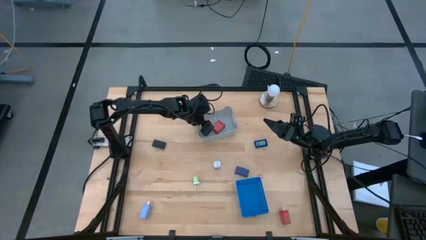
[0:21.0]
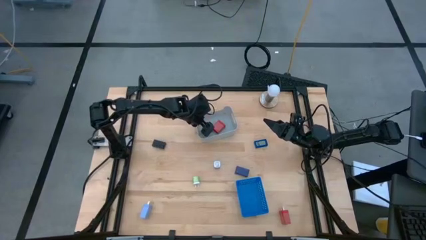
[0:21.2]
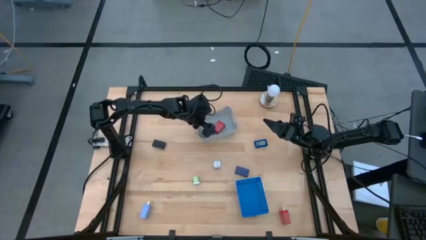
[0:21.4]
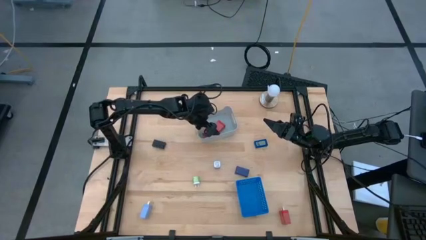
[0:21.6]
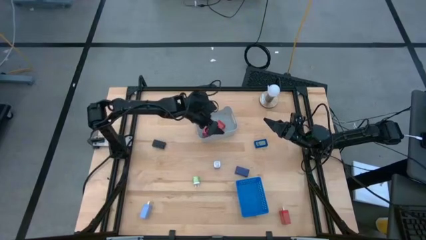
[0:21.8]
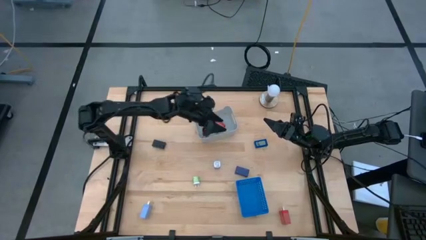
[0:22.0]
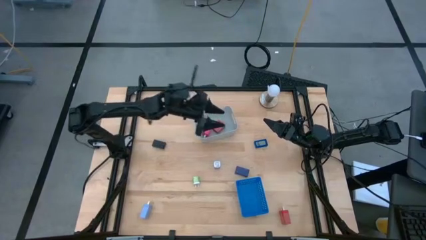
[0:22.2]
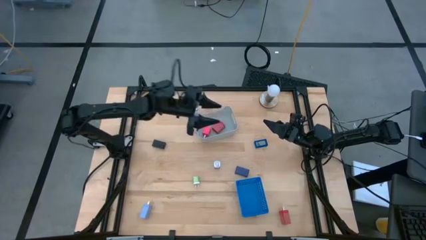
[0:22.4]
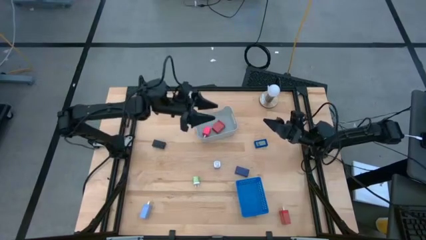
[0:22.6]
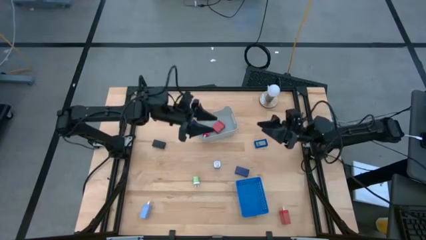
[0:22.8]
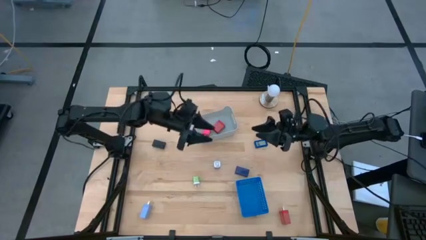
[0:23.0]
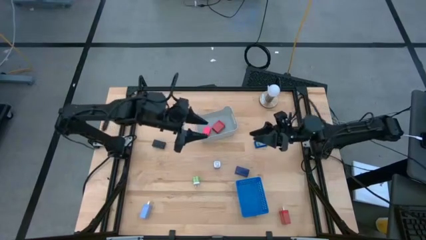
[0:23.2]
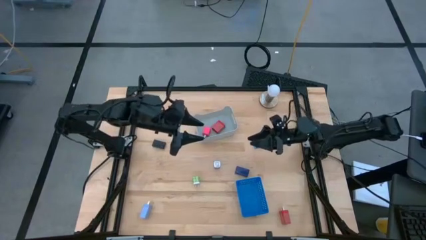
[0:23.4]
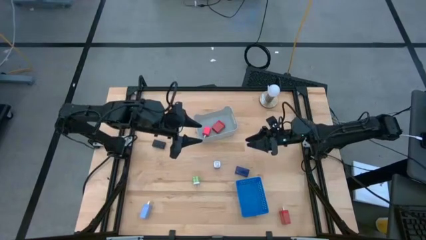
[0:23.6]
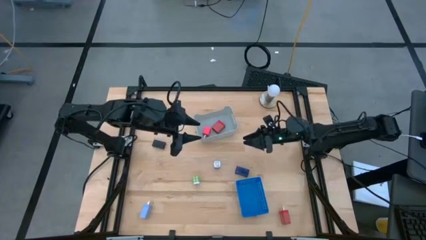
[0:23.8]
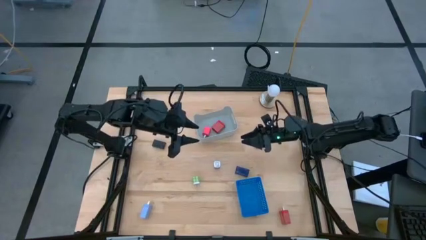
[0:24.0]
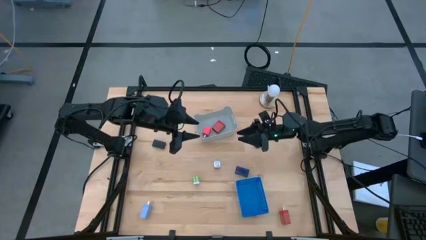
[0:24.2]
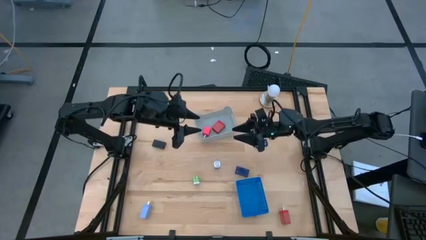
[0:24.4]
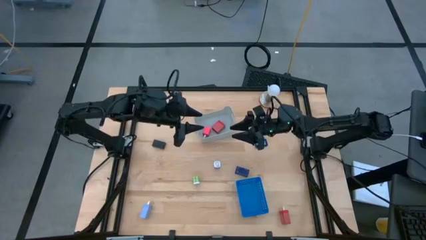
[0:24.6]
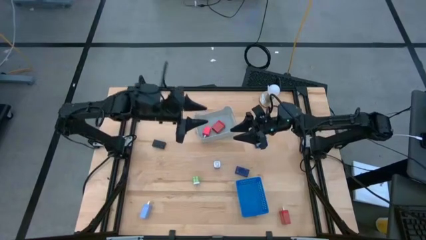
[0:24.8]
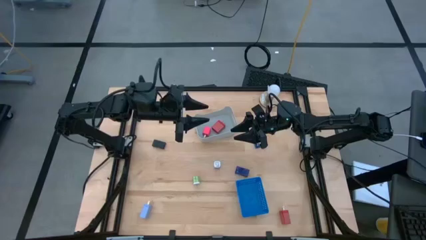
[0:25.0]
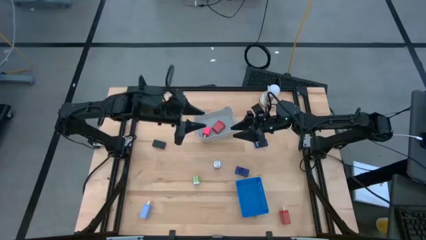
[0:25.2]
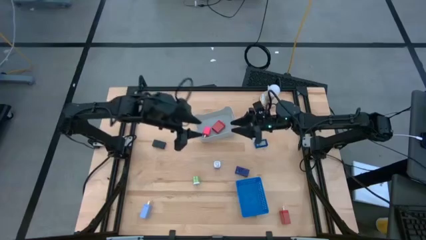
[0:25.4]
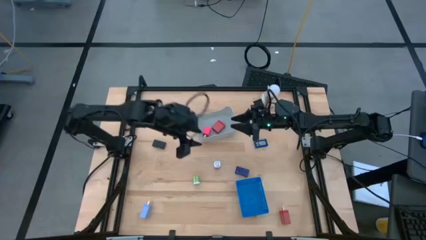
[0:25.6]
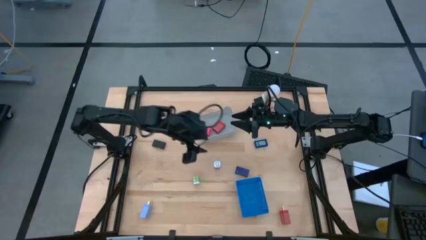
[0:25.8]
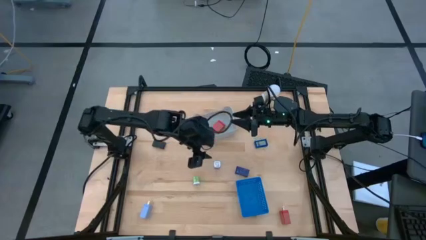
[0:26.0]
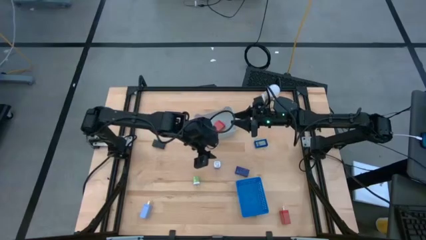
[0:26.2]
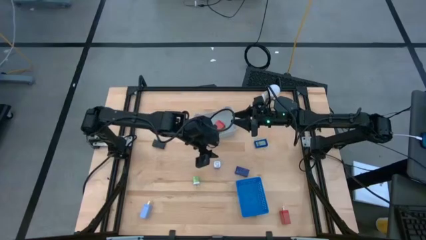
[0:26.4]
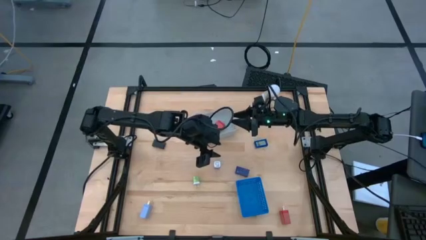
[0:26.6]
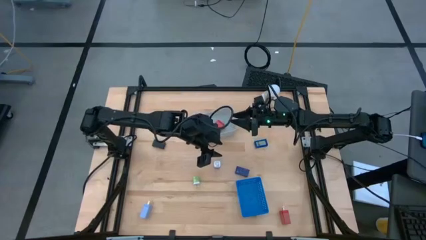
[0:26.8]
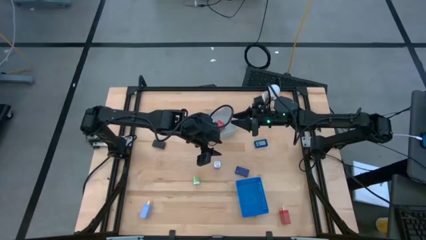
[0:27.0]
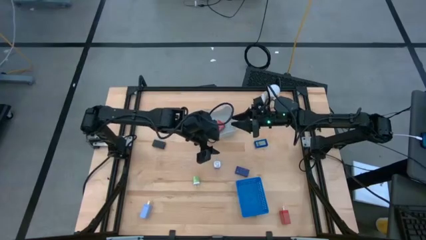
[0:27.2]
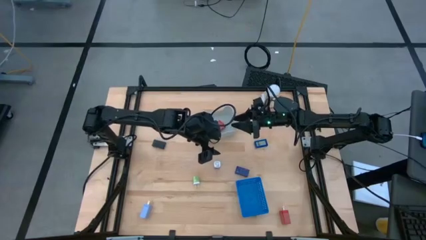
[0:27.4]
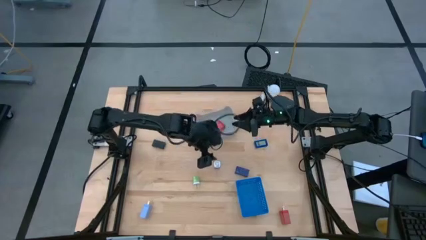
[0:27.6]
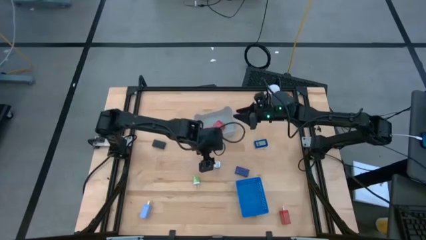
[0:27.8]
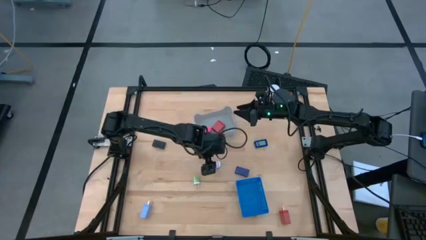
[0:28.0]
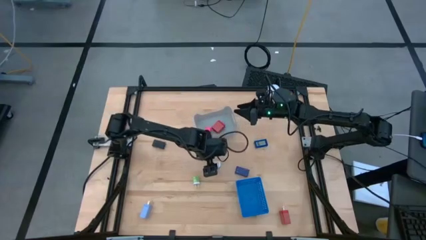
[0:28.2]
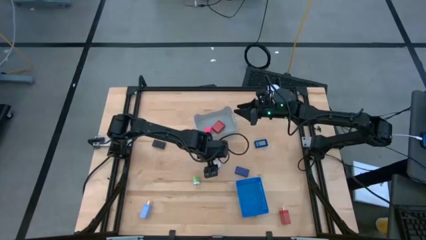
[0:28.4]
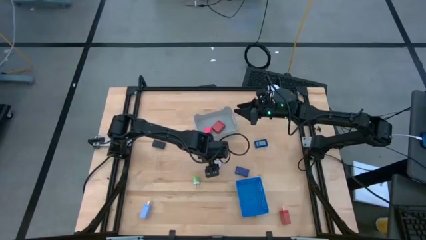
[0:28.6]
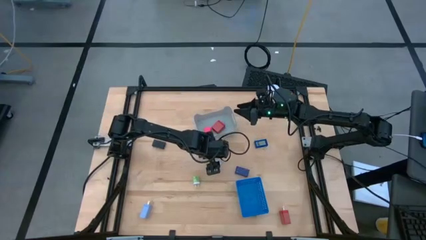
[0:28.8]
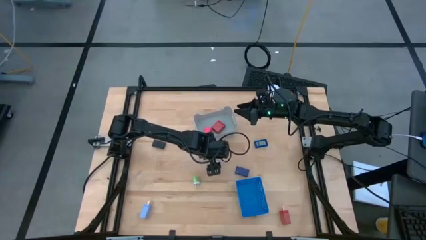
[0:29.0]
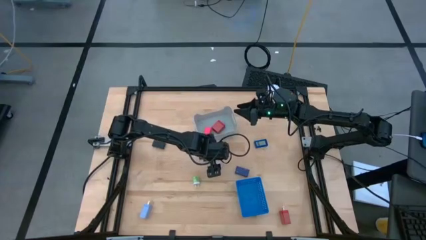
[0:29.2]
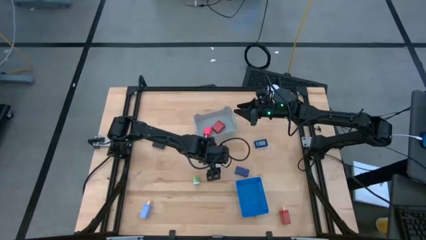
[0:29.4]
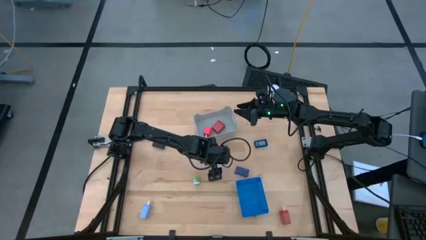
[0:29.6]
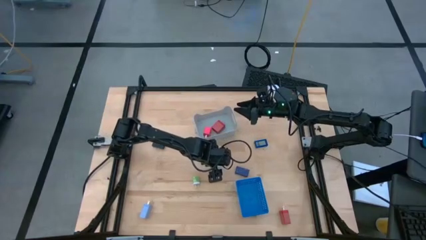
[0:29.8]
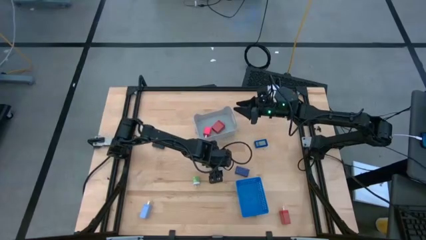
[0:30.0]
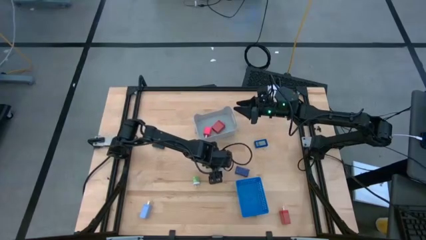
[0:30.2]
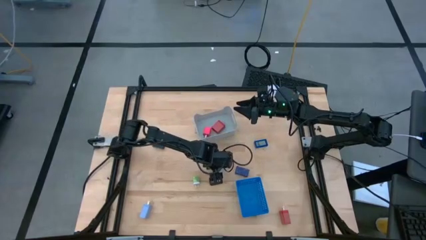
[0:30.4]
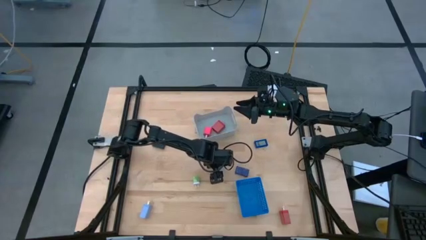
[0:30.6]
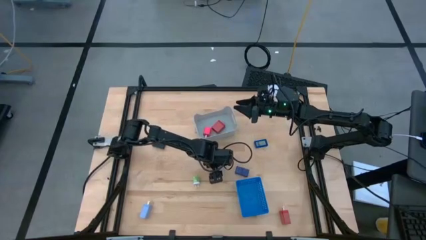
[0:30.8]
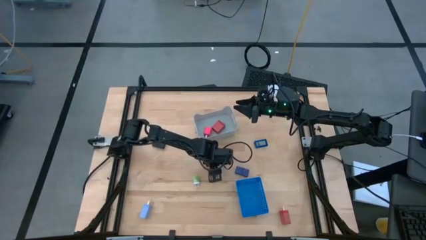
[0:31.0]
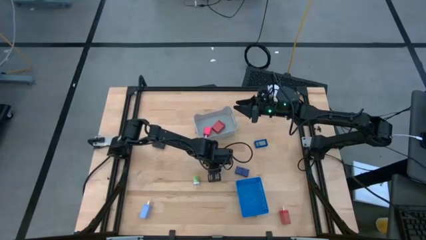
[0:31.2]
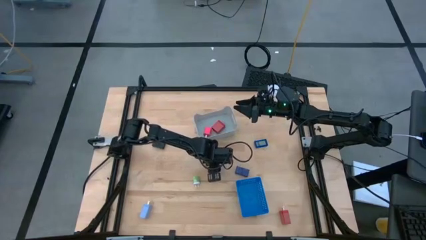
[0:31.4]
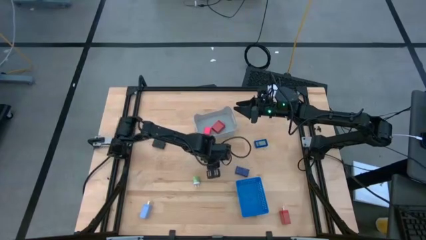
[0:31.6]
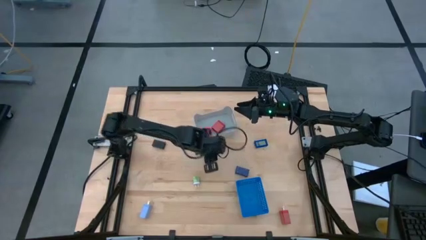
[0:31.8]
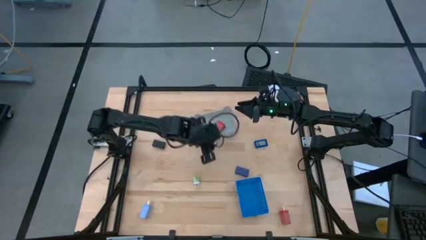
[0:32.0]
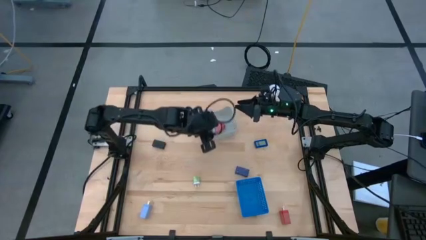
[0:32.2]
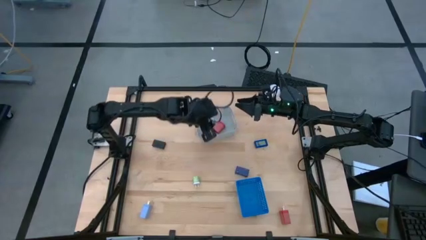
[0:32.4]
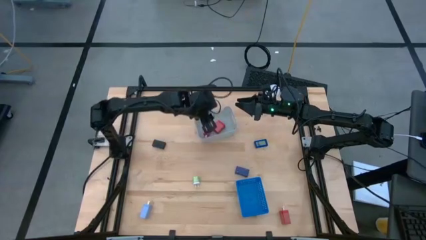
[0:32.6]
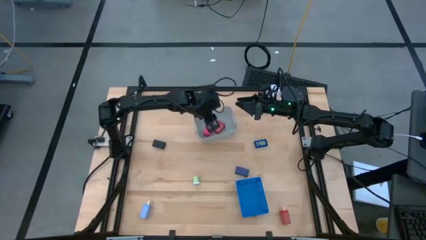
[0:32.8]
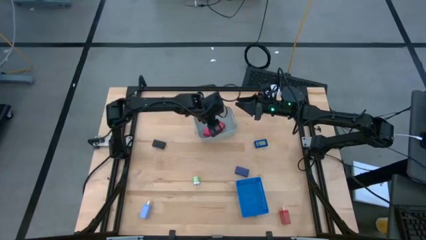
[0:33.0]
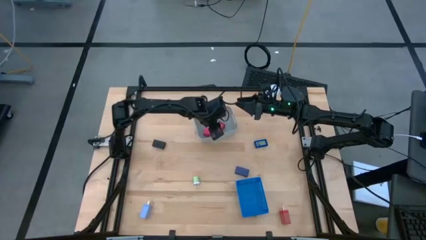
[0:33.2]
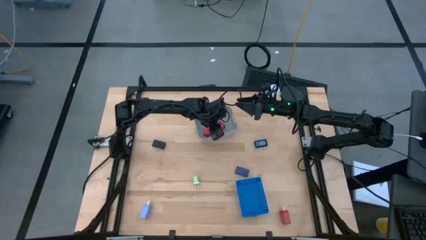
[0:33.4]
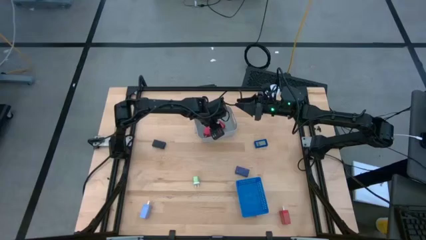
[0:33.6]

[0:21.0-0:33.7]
Task: Pick & Place Office items
Put the purple charger adapter into the gray bin
